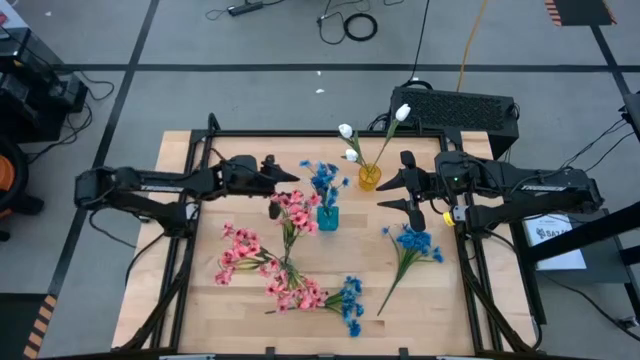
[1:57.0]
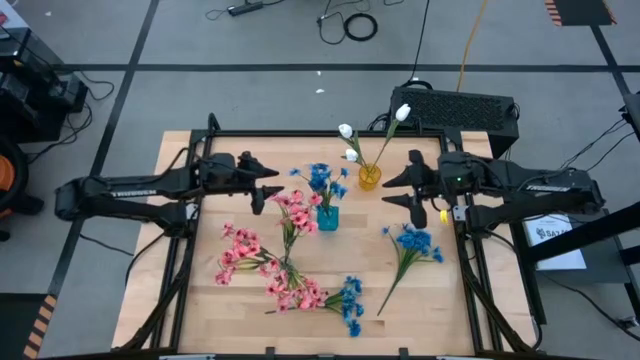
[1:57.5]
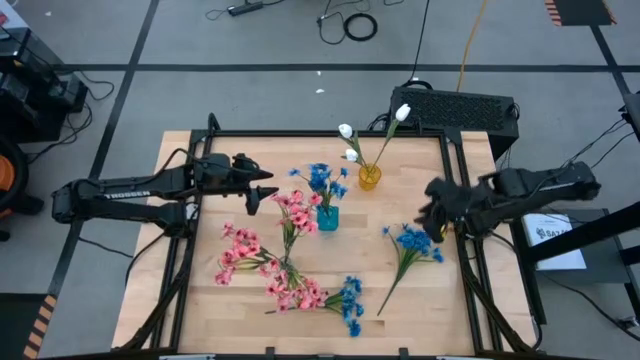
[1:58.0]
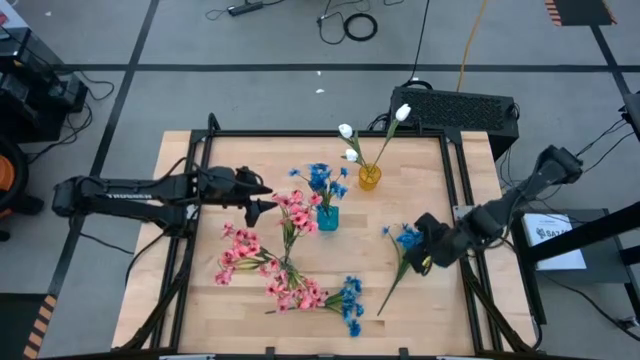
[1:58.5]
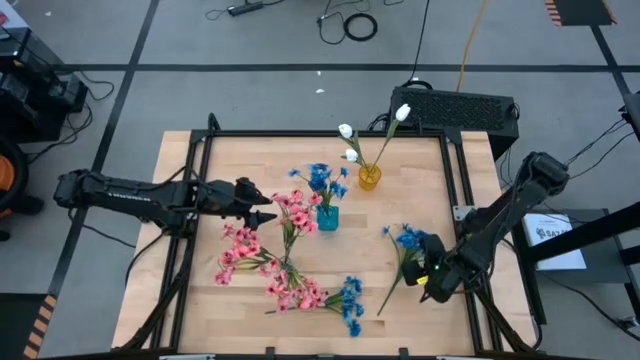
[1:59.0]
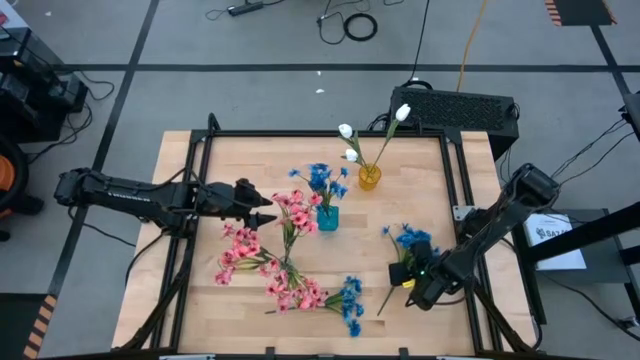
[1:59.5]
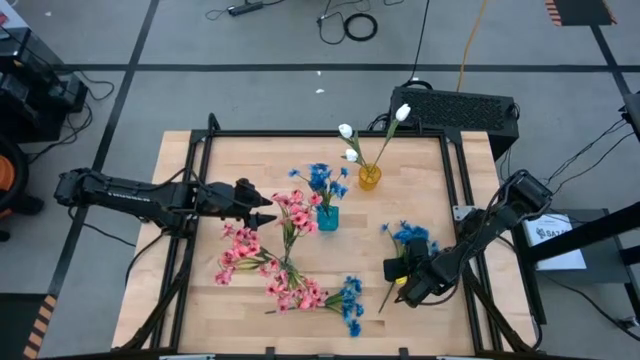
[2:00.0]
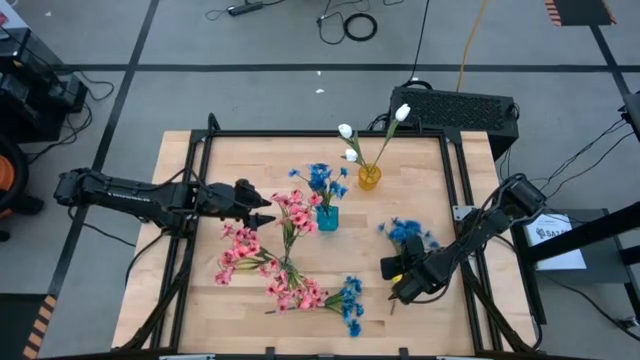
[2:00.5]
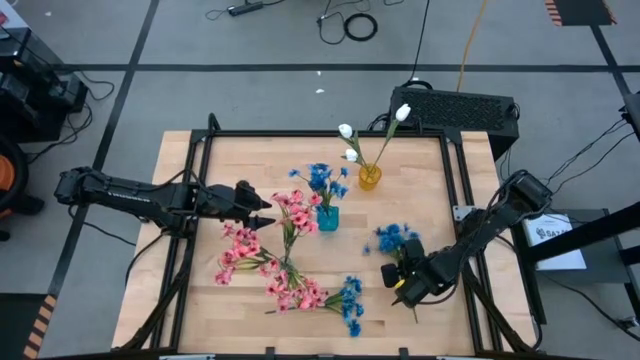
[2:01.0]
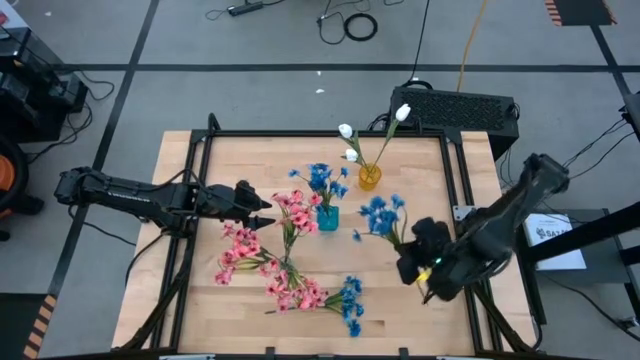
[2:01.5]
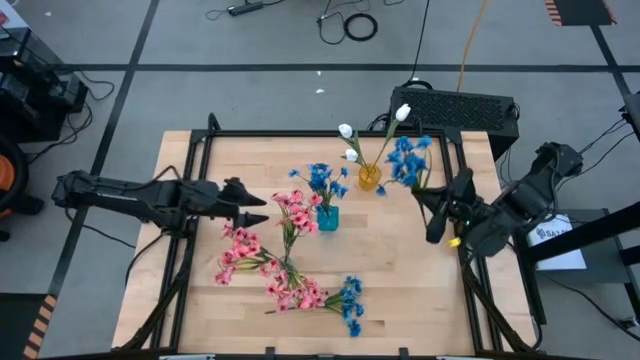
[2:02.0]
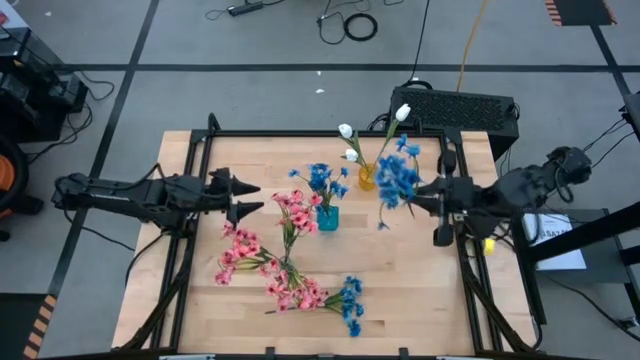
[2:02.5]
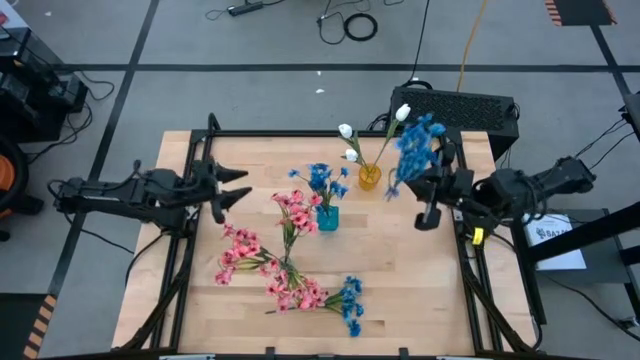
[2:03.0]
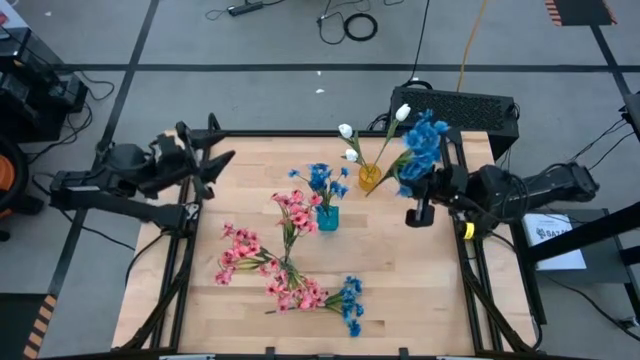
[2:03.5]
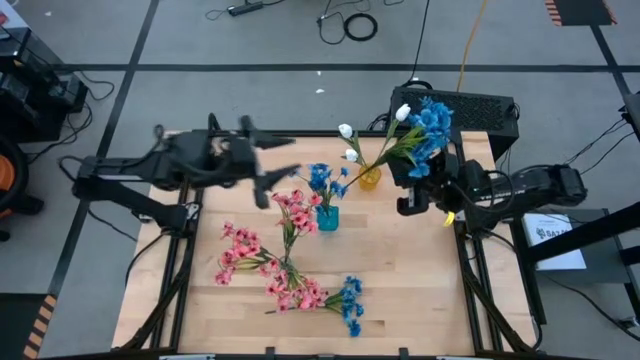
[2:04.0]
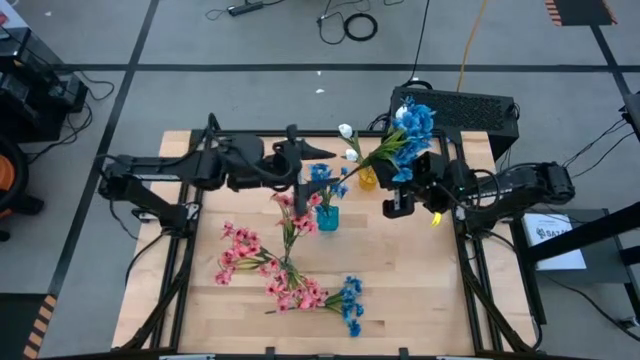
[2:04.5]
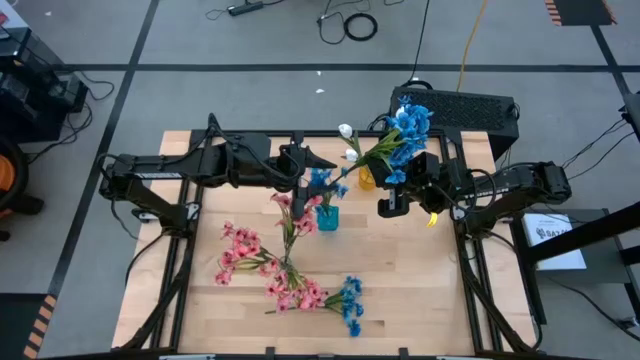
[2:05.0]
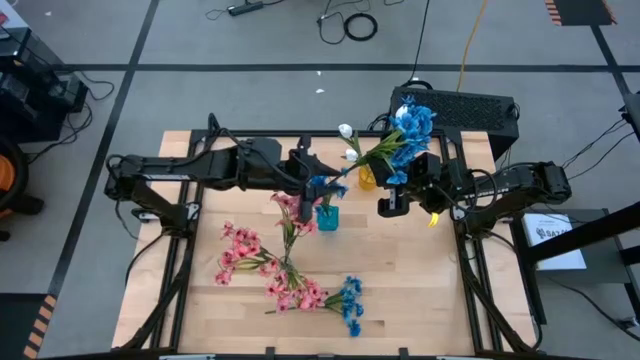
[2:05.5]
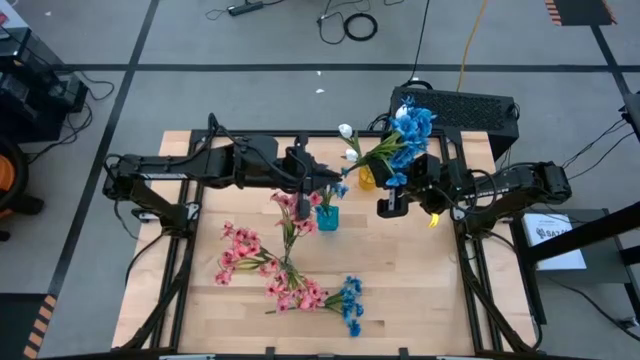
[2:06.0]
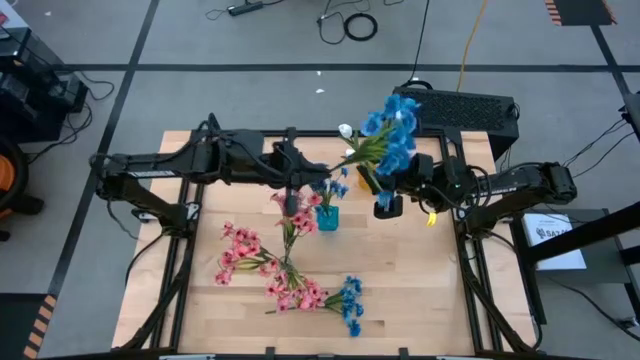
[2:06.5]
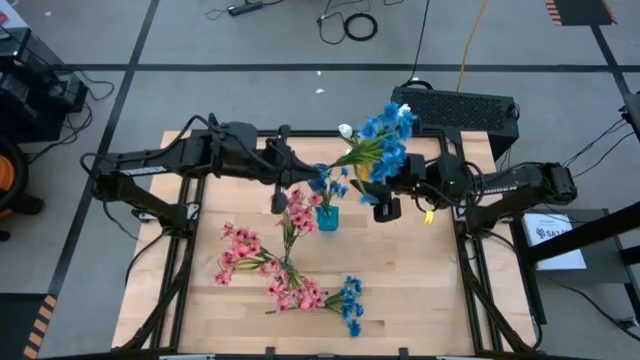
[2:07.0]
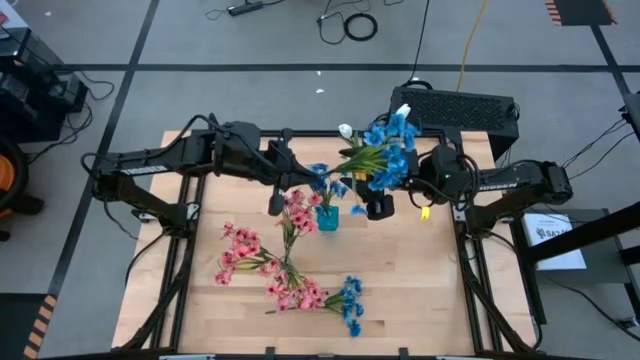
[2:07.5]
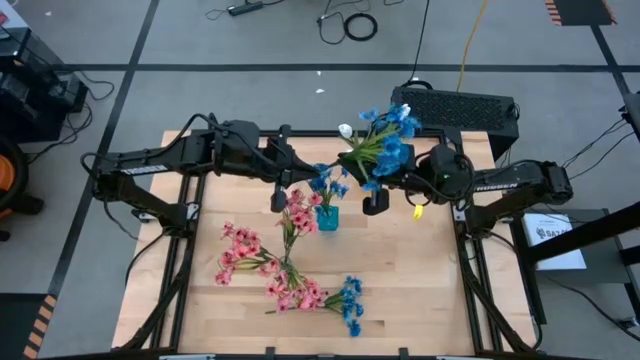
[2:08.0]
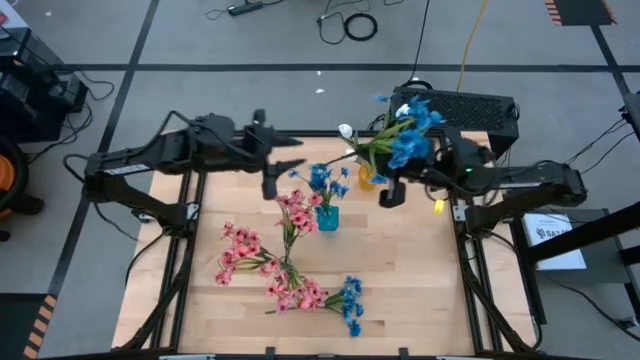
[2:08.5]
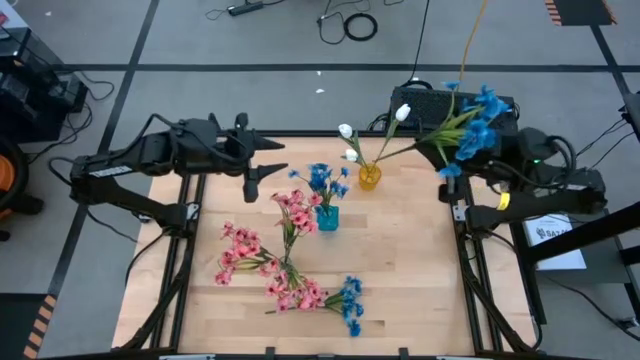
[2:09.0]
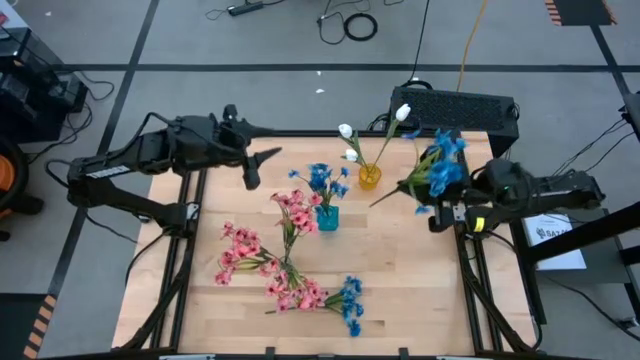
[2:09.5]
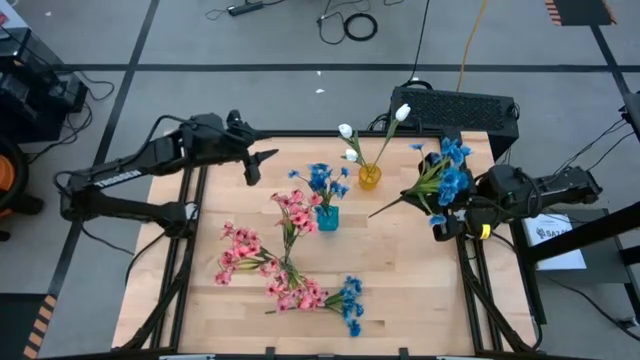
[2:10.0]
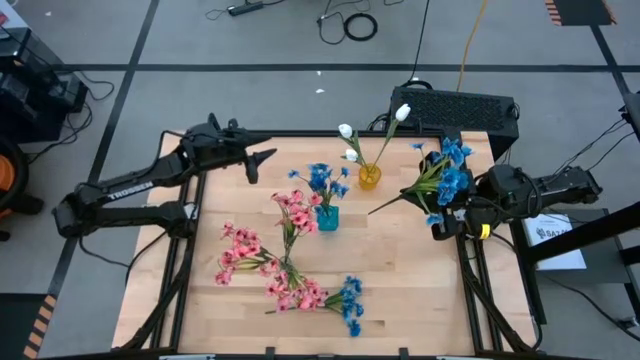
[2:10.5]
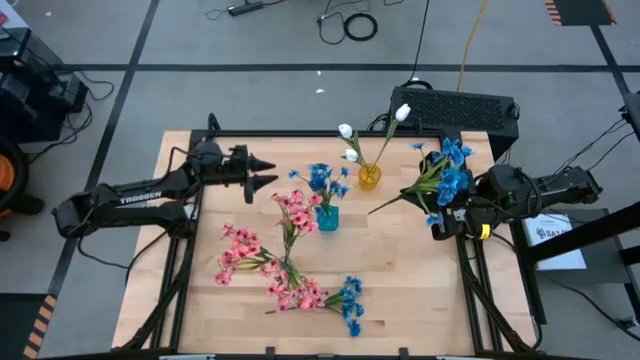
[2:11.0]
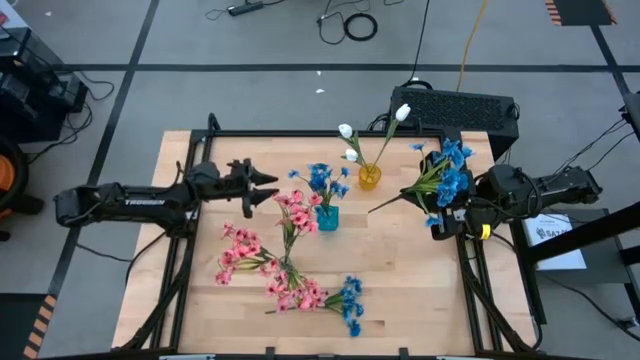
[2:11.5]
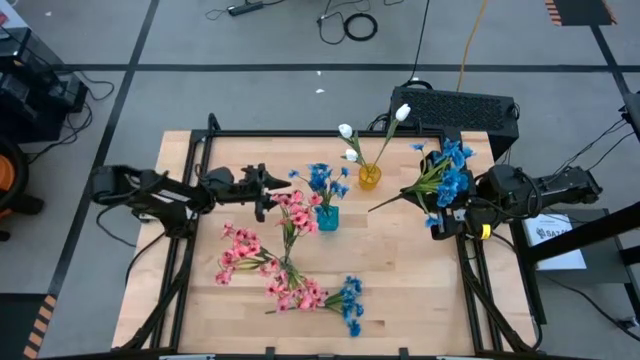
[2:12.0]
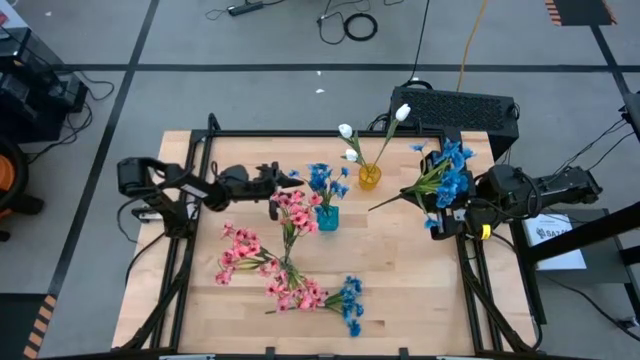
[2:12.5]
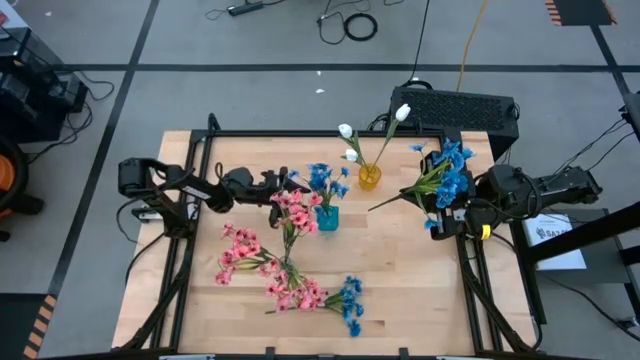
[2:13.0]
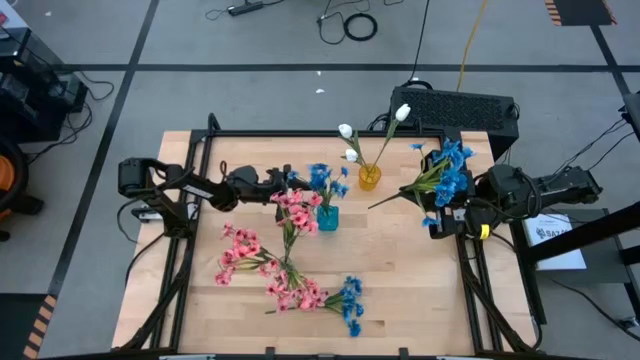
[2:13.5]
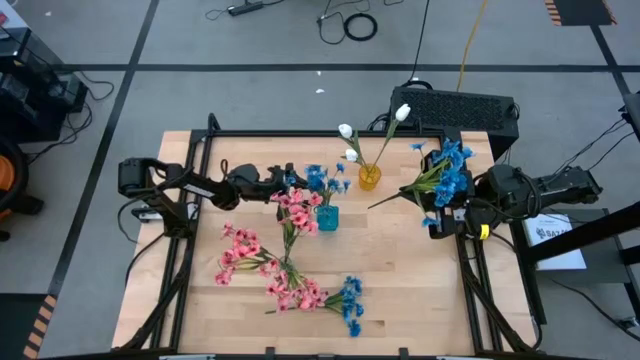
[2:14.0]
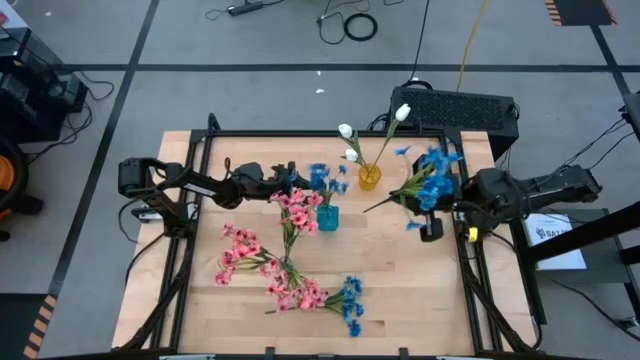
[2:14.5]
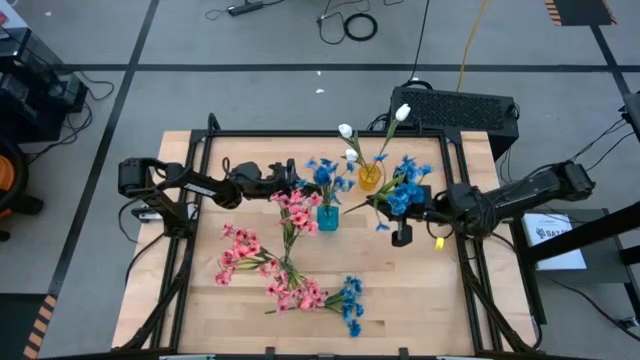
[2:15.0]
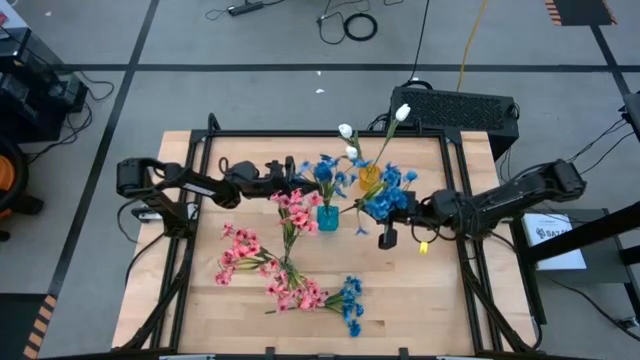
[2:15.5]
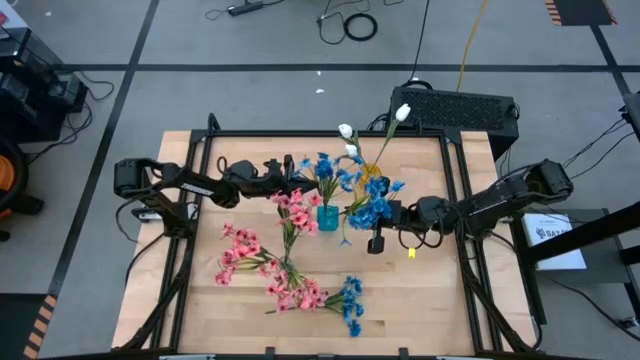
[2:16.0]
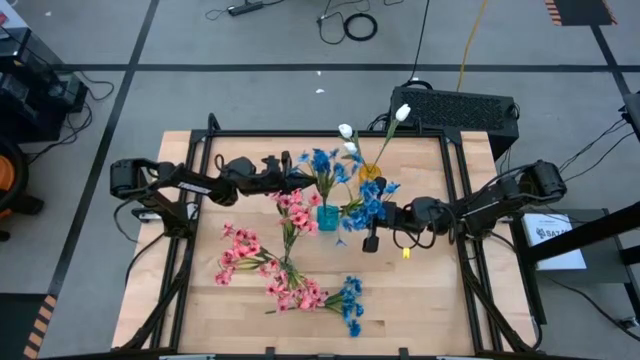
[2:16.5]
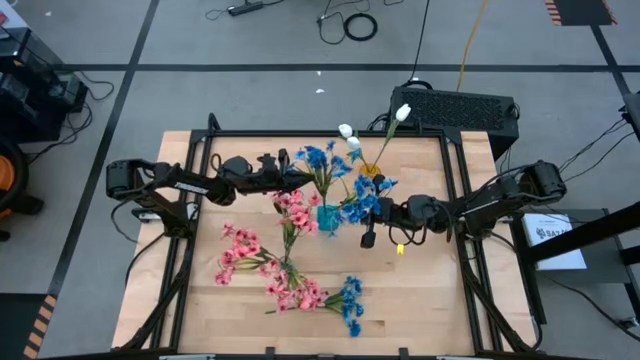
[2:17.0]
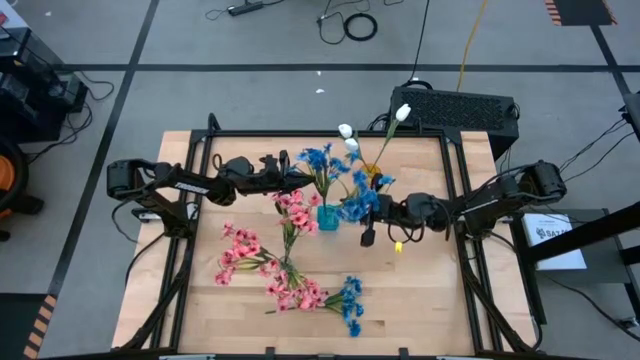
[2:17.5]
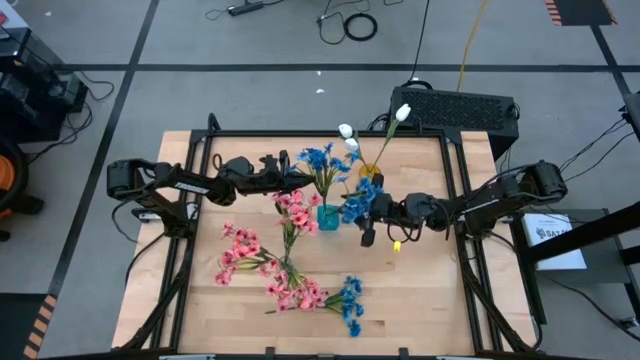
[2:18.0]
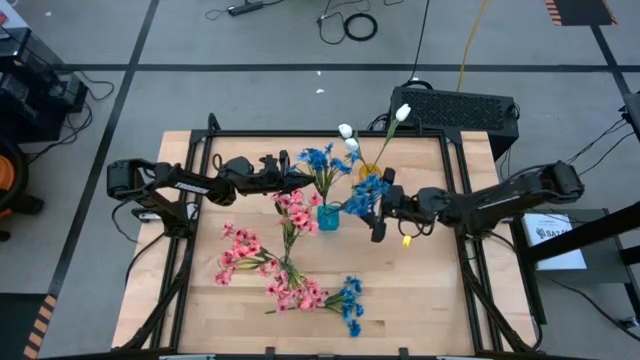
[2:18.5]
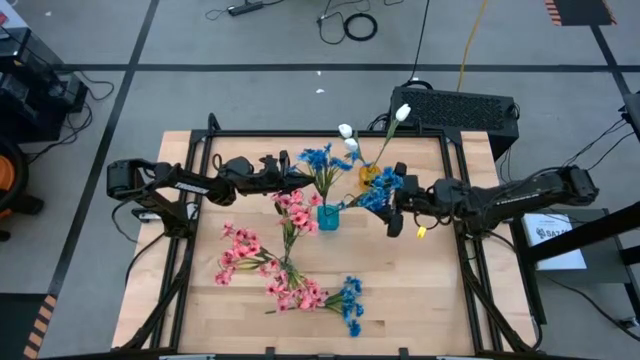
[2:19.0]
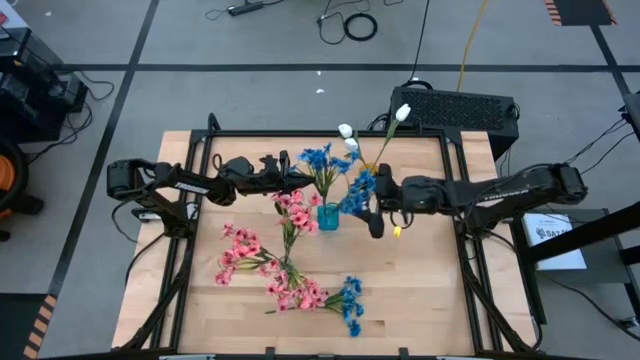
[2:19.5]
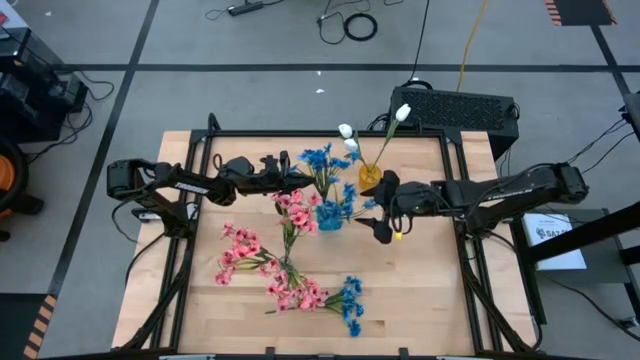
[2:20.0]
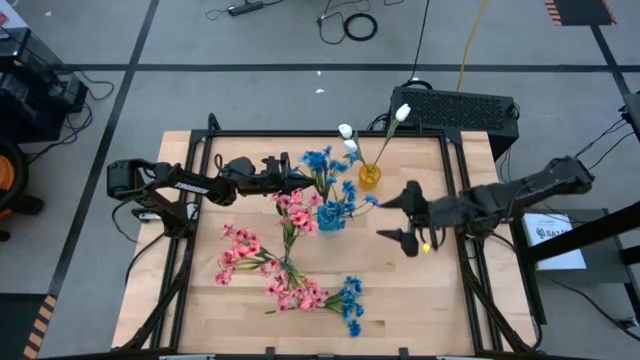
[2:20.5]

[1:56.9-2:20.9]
Task: Sort flowers into vase by color
Put the top blue flowers into the blue vase
